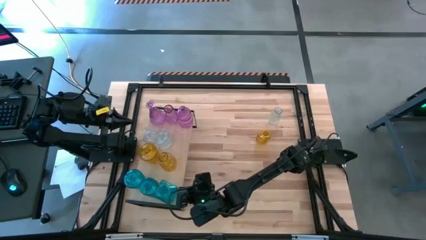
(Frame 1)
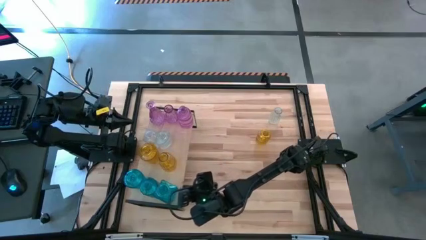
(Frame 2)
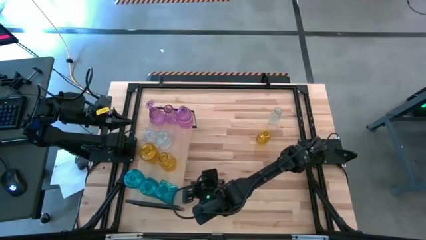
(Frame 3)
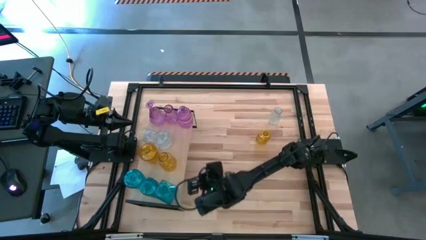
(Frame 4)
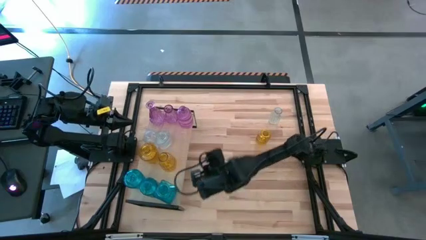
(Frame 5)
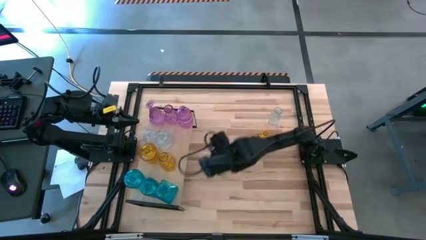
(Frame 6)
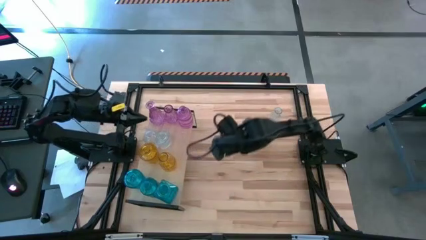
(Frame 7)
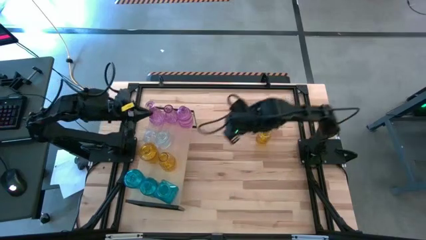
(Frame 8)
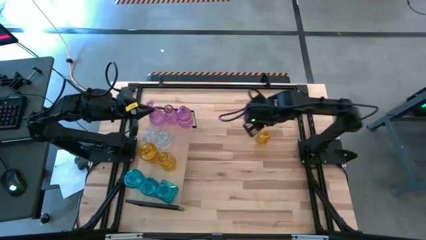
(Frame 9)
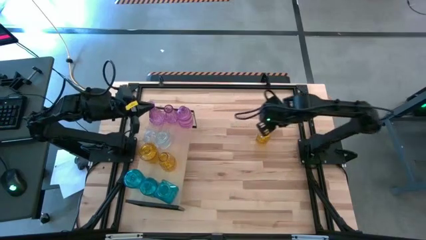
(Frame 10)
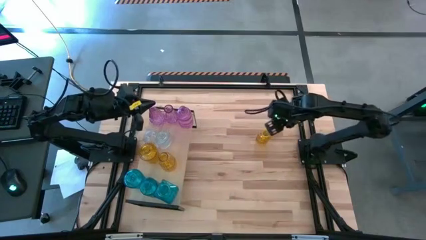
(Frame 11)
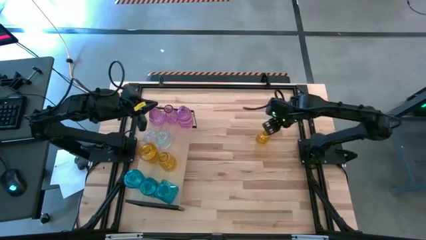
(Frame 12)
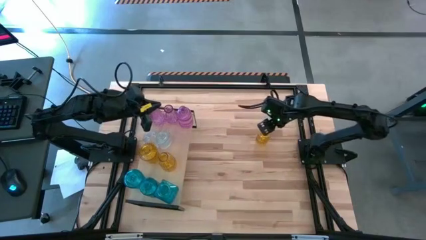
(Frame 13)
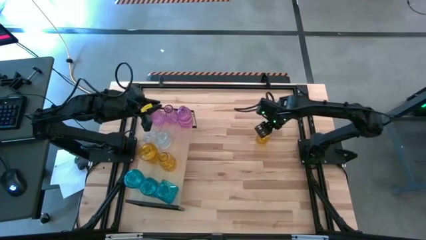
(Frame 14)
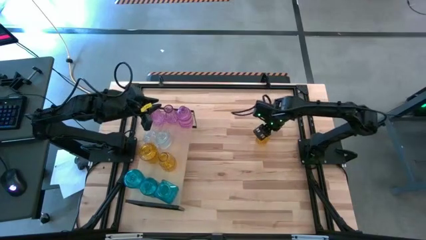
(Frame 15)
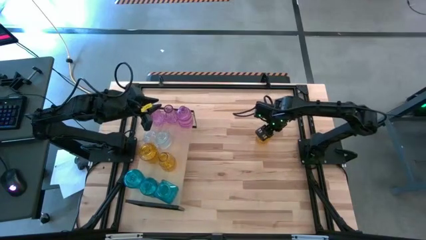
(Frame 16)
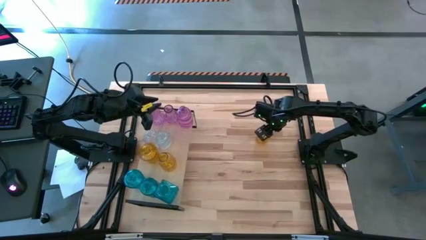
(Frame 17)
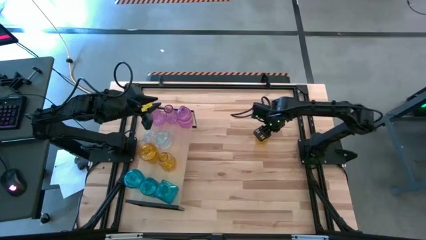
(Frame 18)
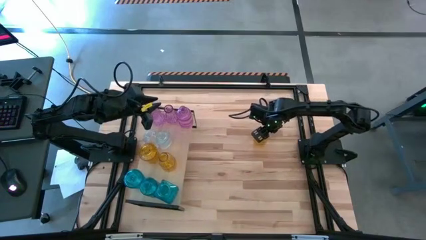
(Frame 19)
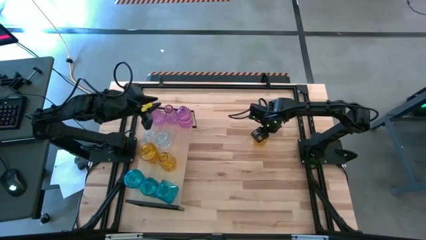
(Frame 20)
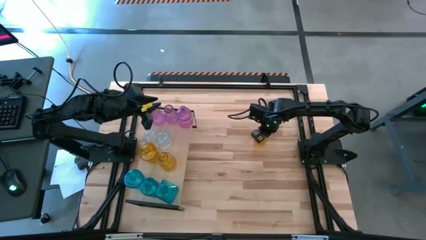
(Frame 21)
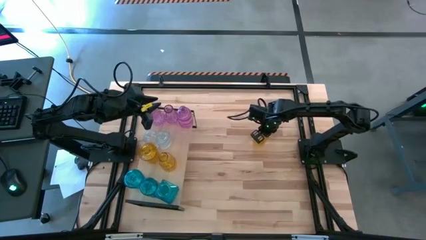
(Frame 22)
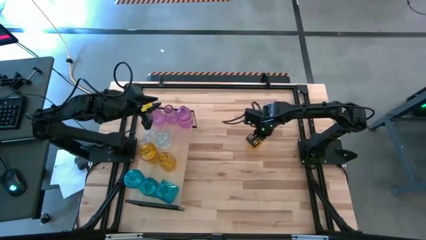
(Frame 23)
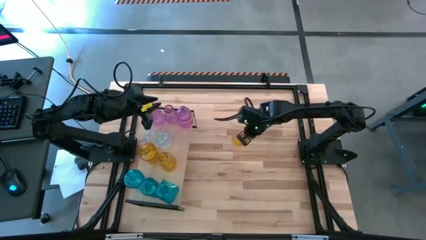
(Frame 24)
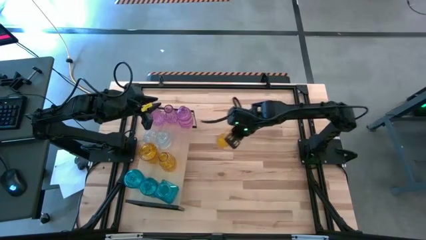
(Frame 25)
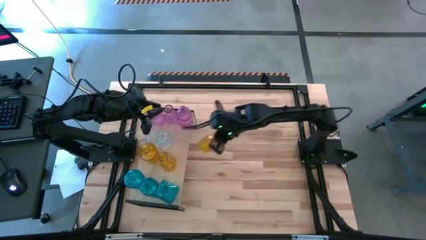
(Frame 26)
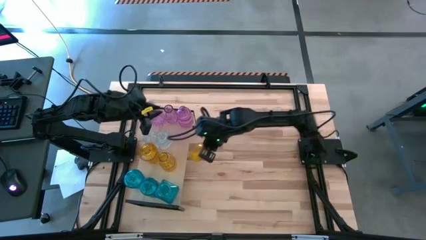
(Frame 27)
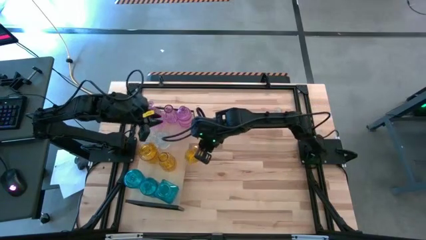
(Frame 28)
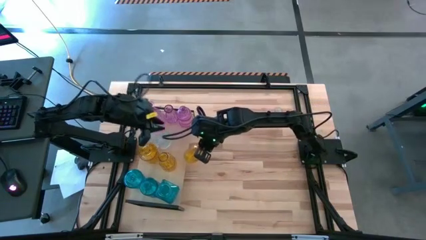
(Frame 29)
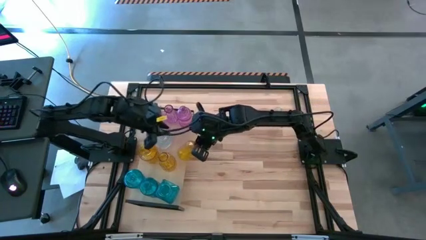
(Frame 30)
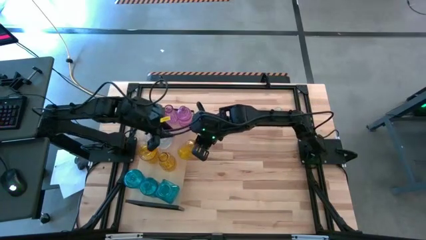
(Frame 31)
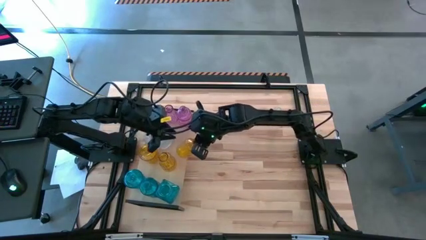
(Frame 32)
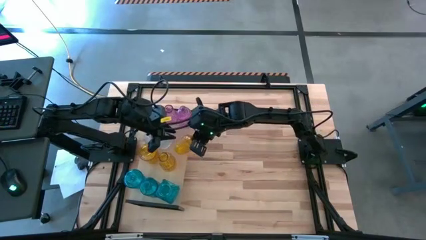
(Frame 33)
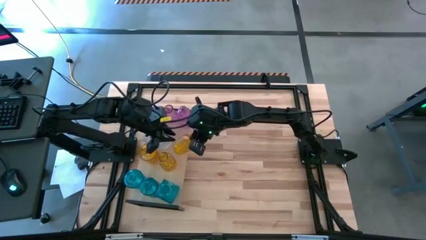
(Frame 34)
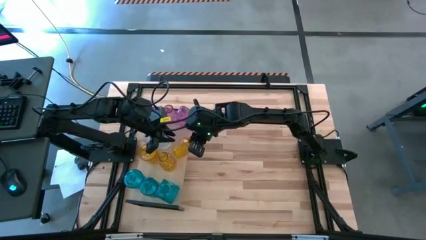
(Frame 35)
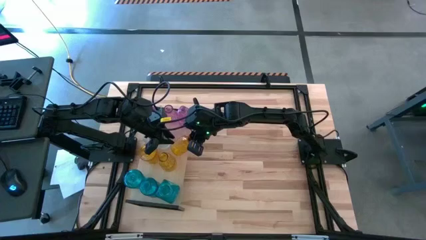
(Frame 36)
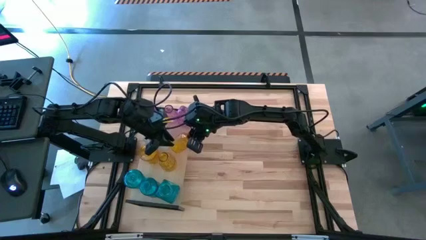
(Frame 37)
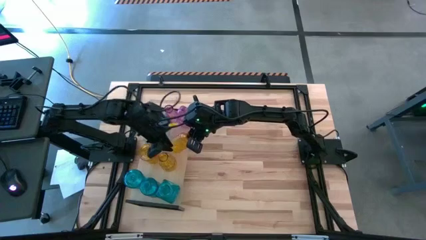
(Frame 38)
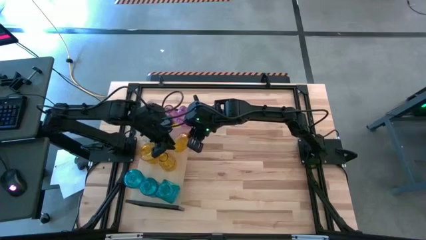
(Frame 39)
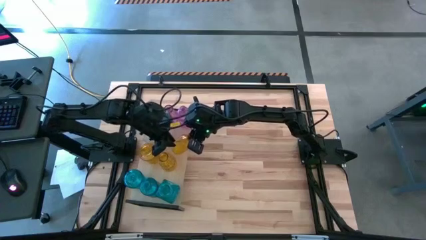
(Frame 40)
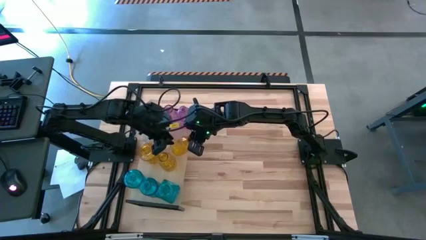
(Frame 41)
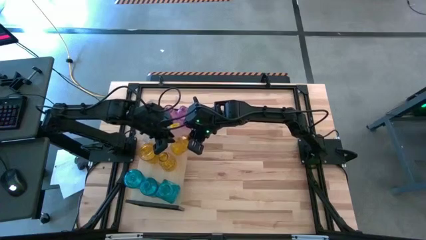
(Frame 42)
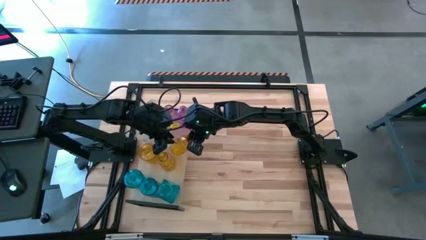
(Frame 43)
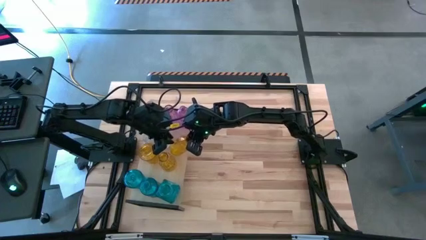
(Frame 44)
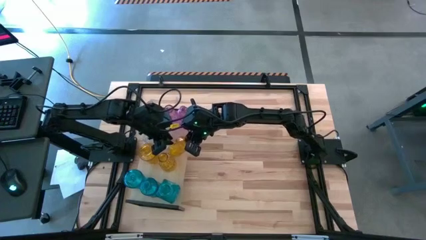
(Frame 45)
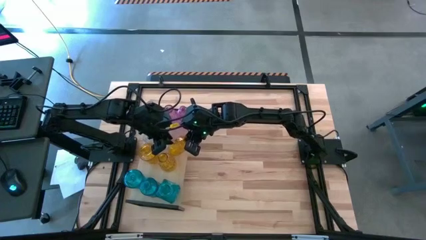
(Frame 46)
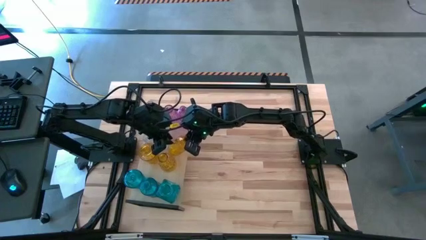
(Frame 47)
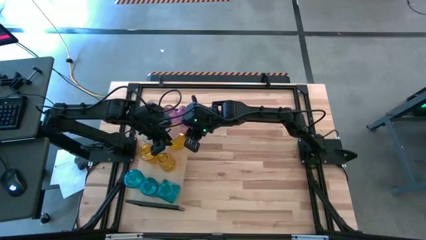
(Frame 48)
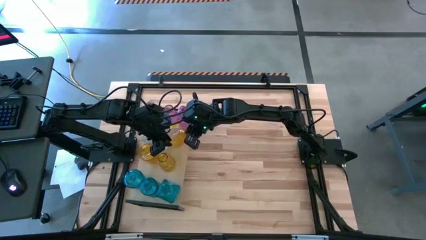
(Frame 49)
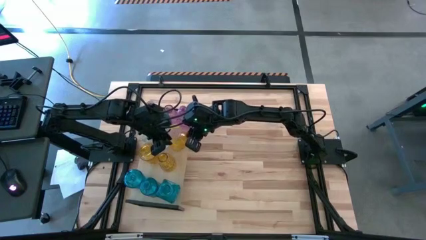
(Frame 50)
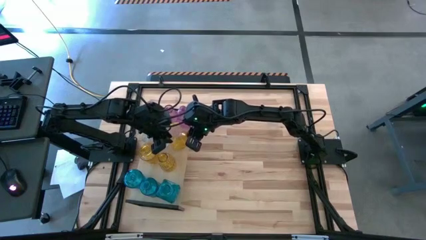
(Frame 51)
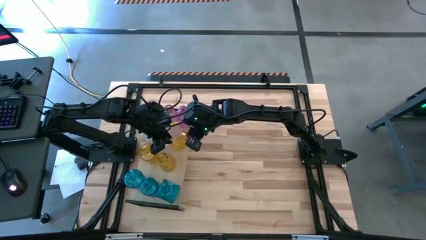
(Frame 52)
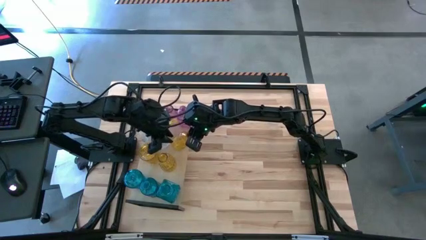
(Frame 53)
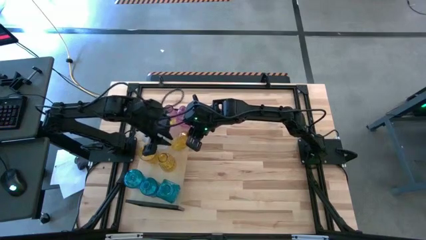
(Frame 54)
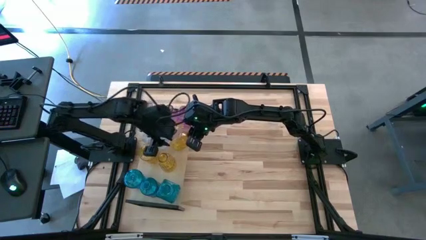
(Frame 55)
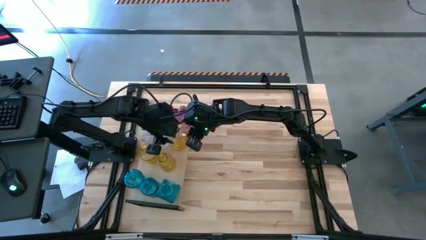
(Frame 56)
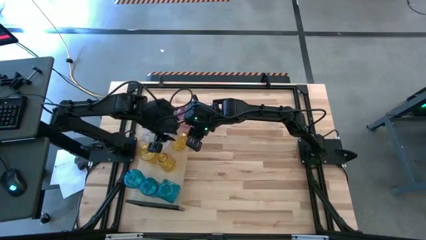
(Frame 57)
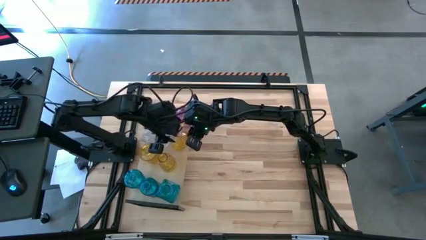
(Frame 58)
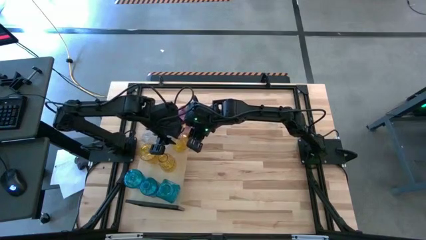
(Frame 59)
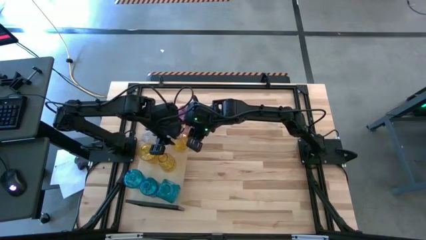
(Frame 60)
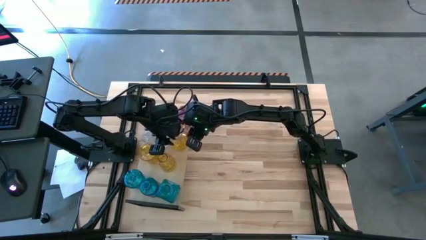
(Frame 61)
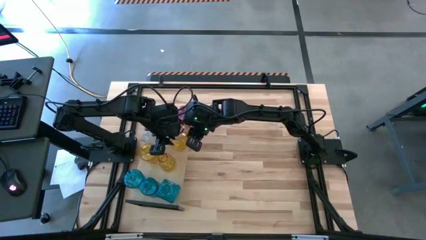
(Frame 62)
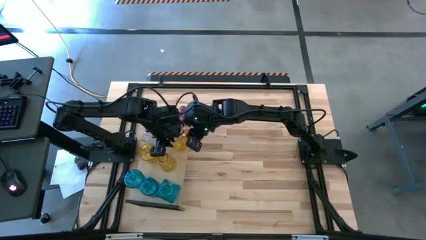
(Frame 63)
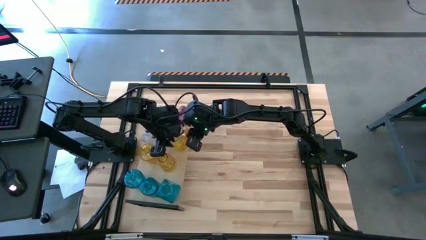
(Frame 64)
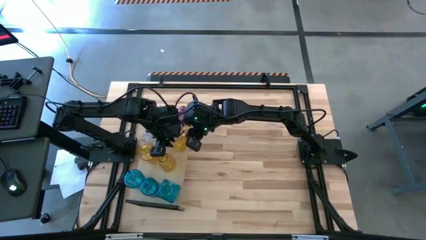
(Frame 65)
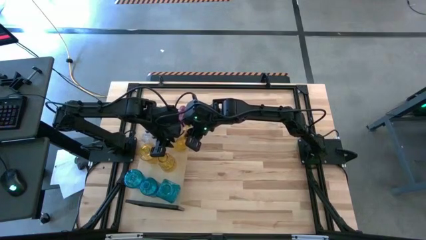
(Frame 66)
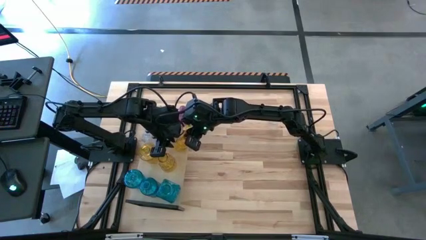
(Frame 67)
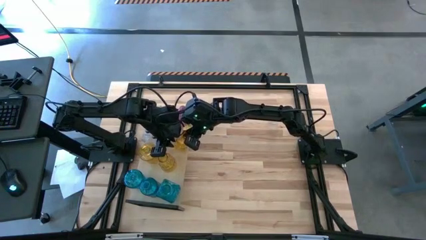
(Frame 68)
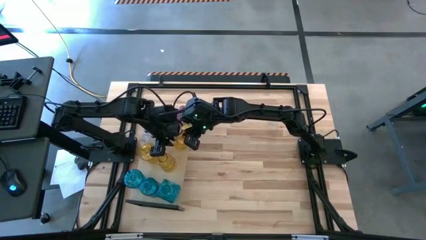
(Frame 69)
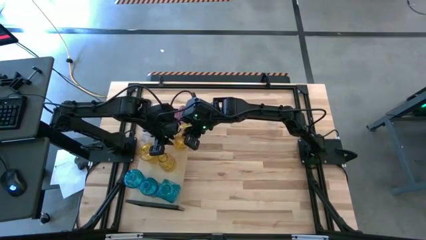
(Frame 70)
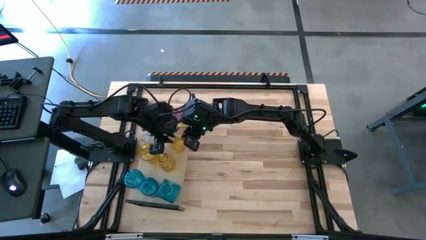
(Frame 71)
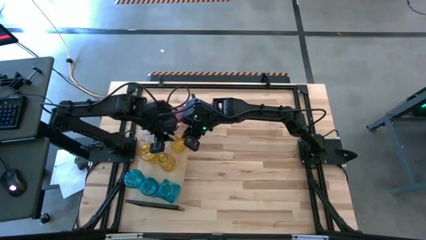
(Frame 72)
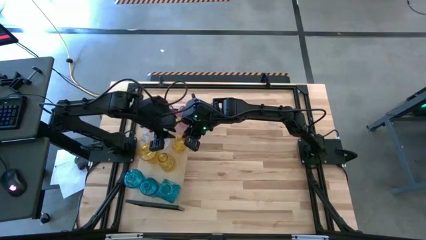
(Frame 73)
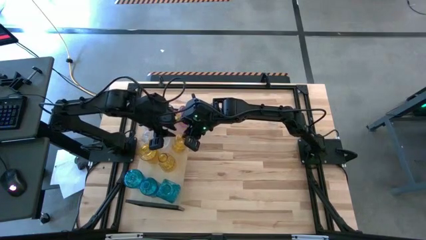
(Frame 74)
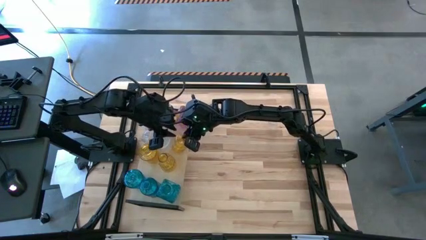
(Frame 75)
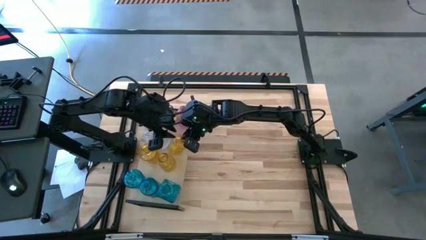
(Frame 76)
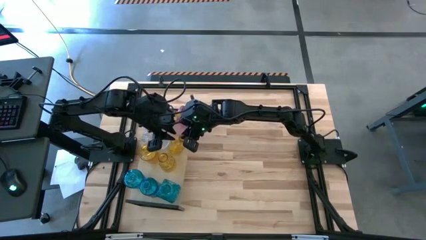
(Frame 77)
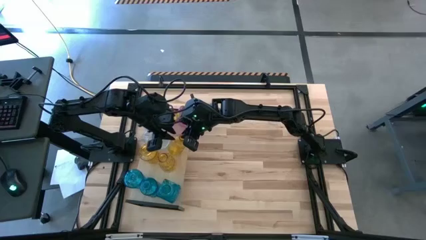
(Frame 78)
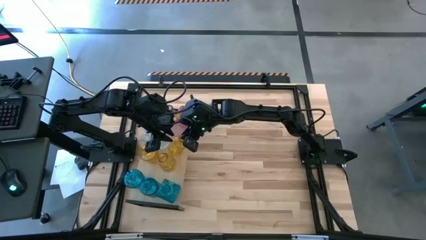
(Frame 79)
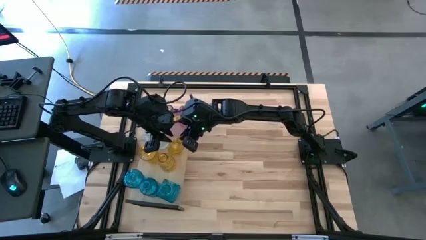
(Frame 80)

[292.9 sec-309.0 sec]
Task: sort vases onto shelf
Put the yellow flower vase on the shelf
